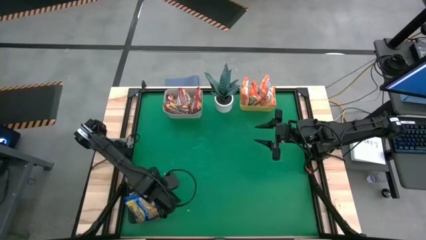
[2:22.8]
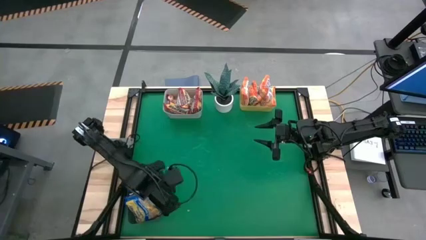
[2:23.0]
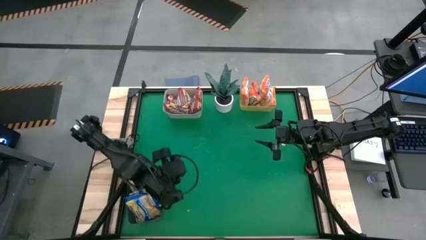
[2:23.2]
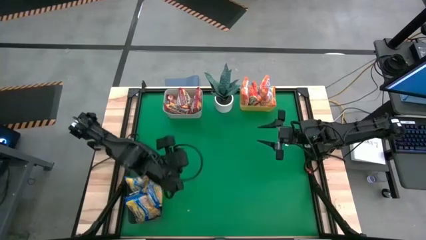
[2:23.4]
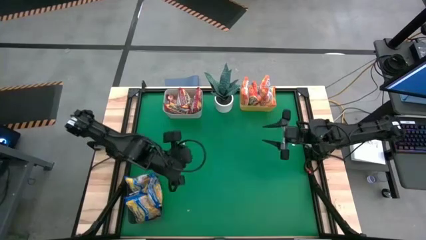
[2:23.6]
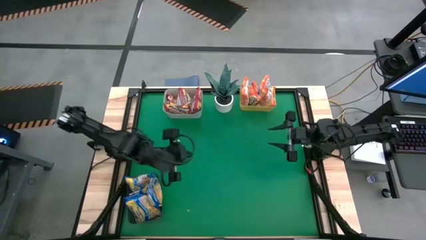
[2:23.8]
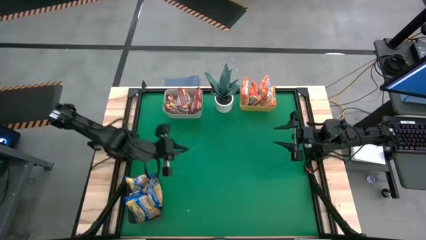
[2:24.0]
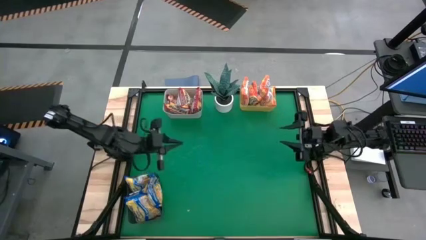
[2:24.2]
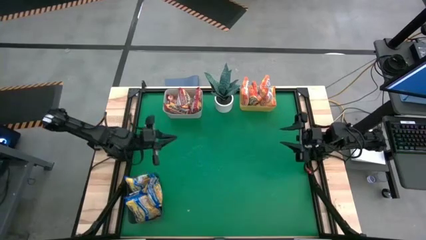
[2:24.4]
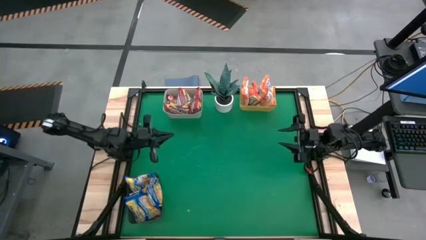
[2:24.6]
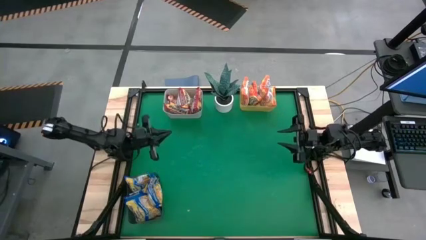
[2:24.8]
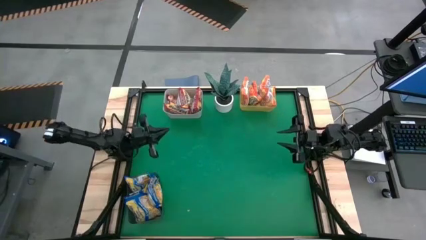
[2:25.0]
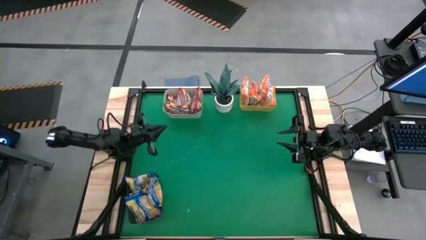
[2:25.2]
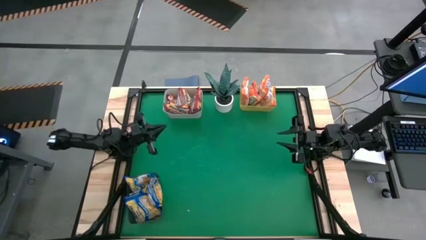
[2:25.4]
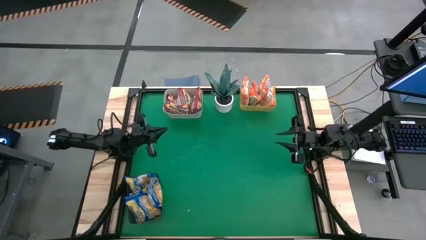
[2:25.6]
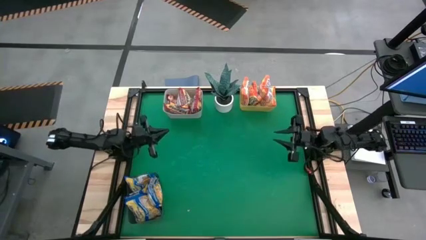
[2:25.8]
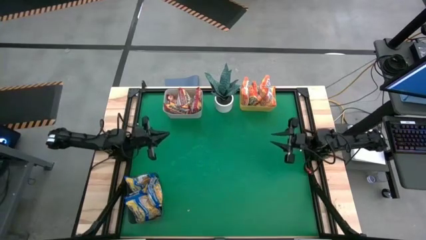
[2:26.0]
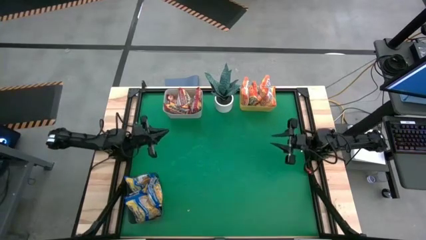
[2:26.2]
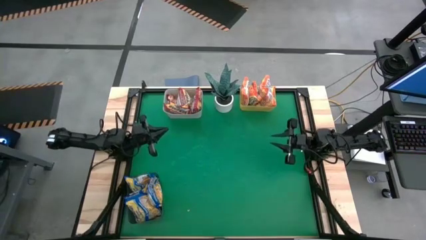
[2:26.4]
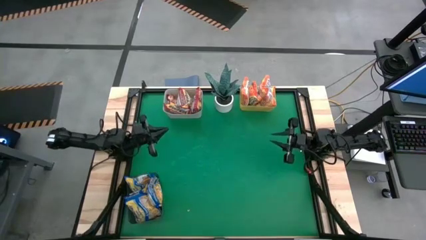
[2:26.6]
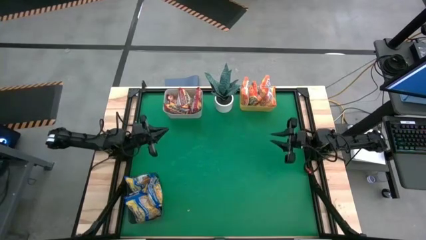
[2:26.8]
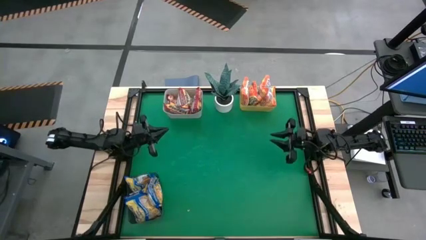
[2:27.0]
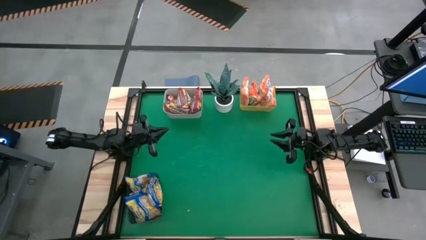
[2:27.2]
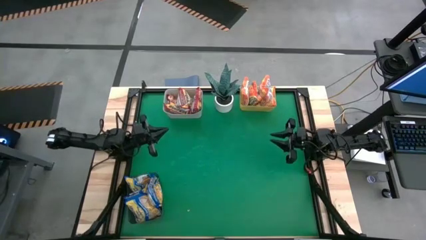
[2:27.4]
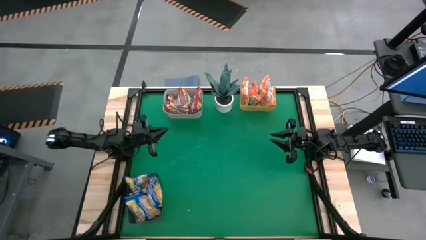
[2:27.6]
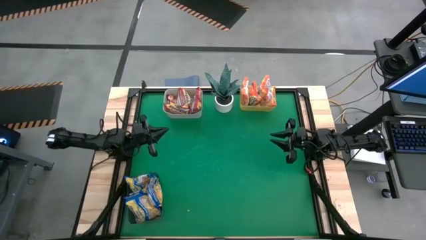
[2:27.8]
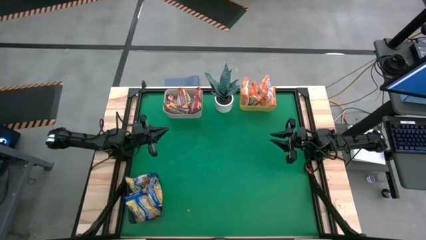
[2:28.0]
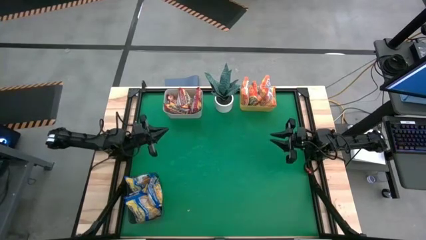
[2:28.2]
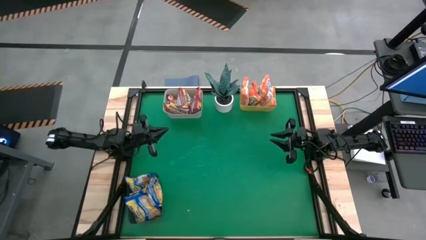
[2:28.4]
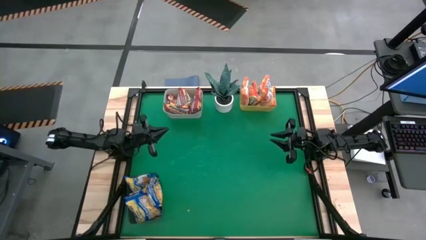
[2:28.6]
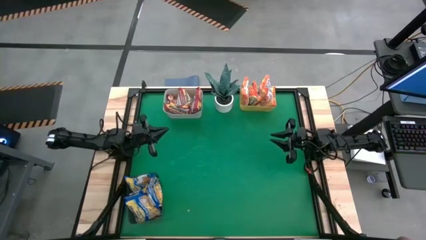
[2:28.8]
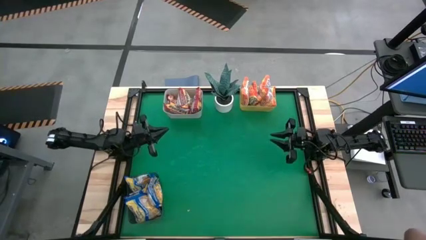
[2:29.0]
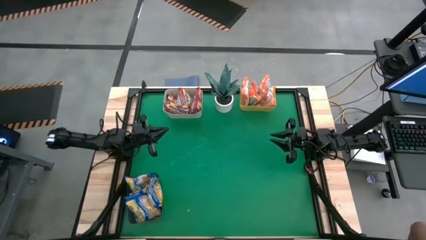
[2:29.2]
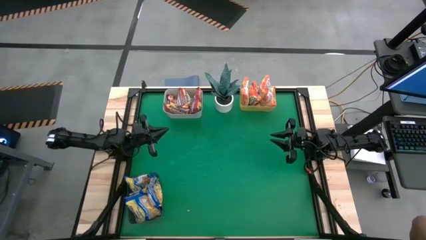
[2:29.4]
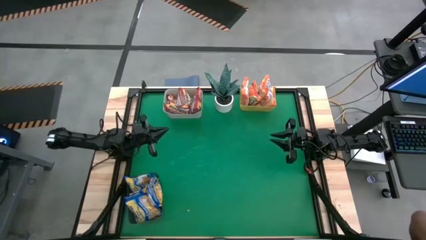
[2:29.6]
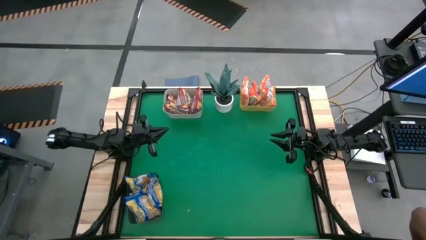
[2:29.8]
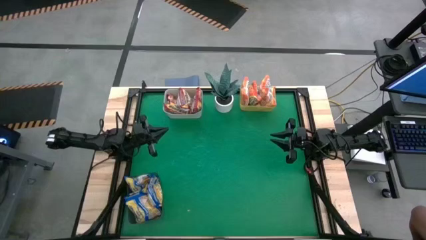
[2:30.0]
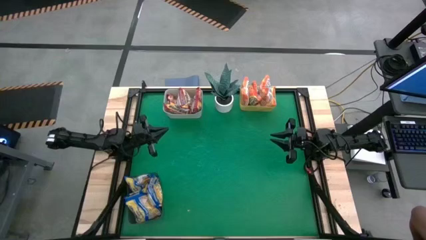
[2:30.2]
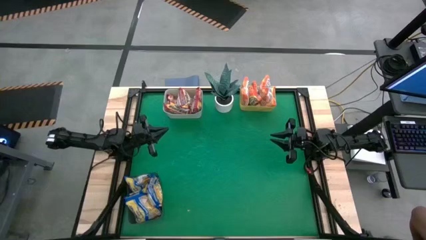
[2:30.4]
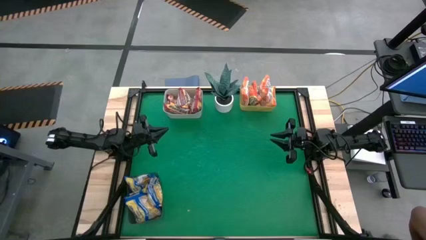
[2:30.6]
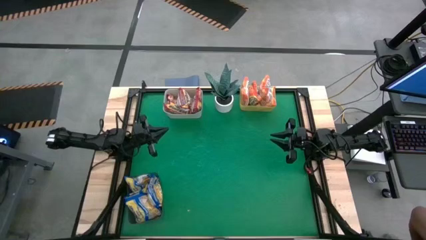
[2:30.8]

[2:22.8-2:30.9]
Task: Sort Maruchan noodles
Return to Home Position

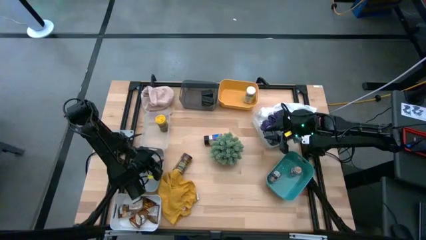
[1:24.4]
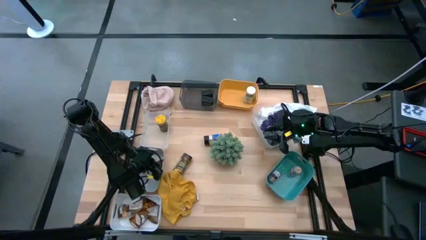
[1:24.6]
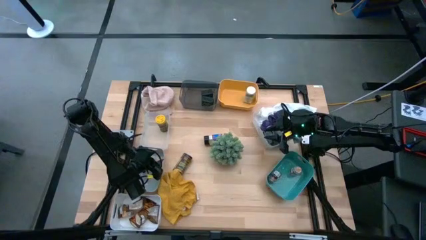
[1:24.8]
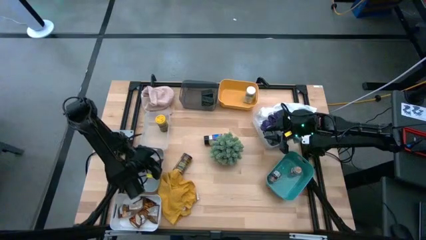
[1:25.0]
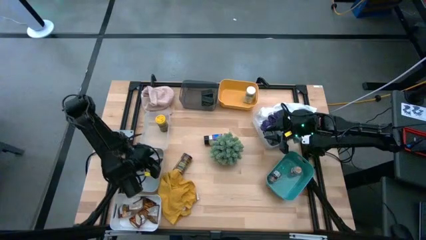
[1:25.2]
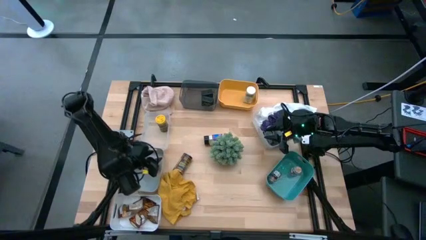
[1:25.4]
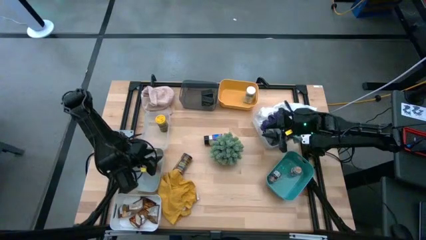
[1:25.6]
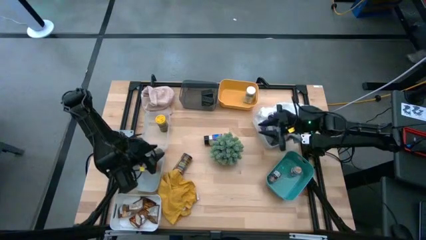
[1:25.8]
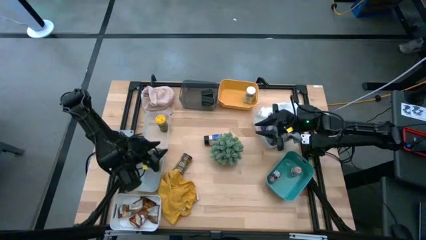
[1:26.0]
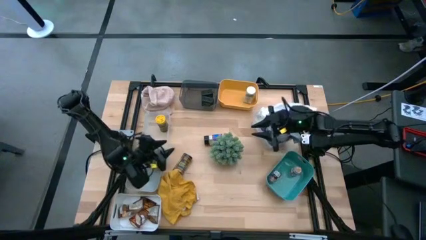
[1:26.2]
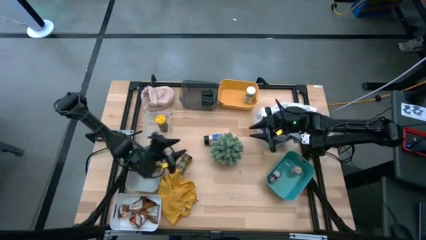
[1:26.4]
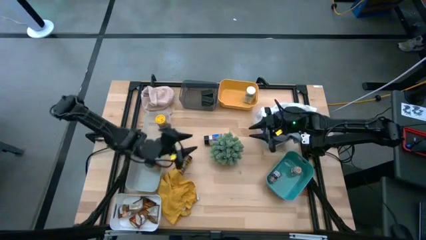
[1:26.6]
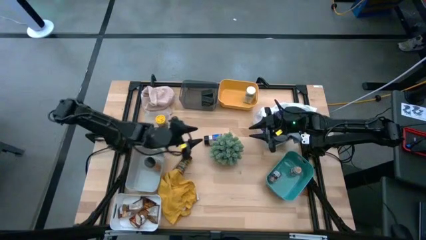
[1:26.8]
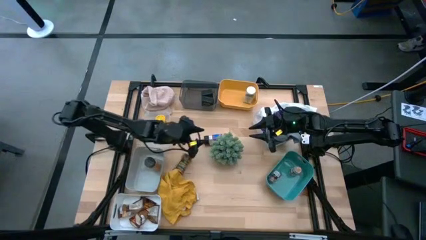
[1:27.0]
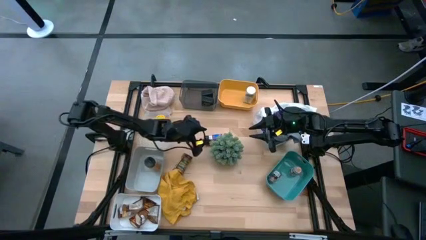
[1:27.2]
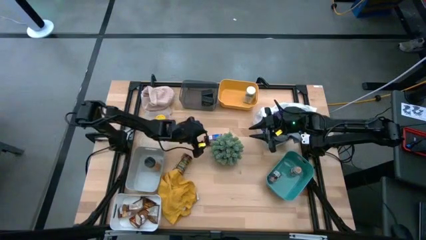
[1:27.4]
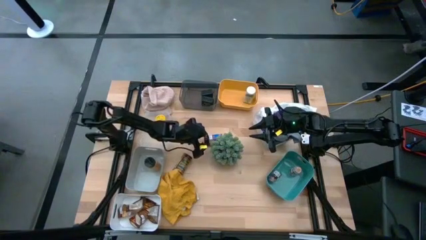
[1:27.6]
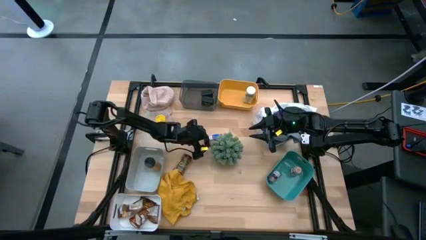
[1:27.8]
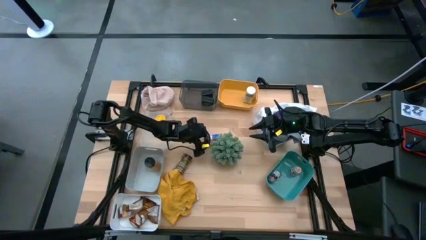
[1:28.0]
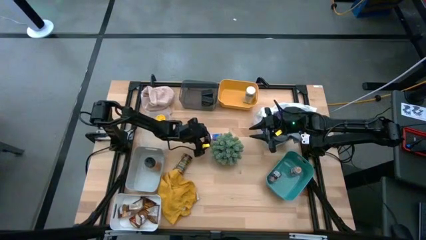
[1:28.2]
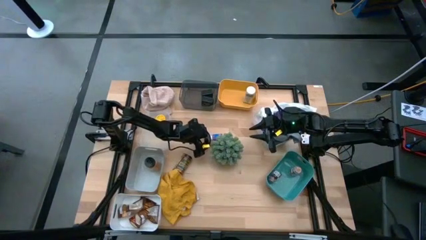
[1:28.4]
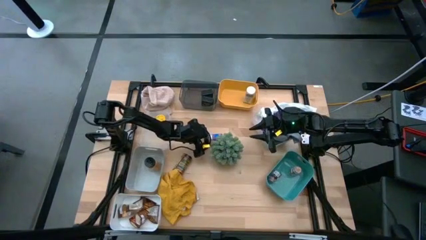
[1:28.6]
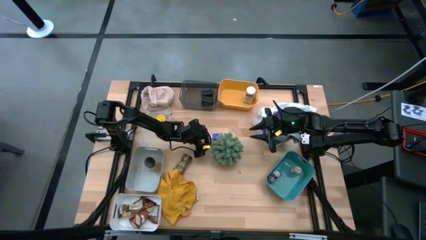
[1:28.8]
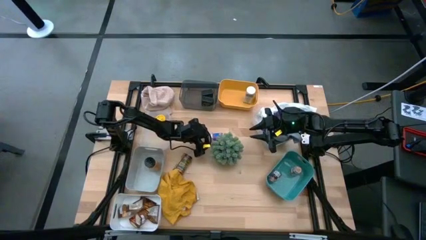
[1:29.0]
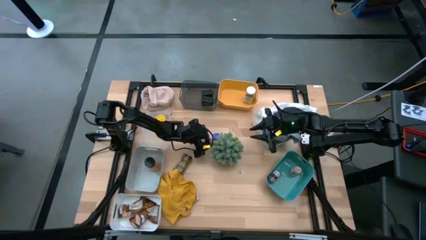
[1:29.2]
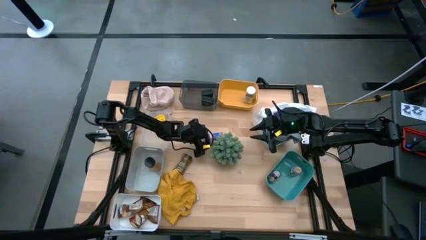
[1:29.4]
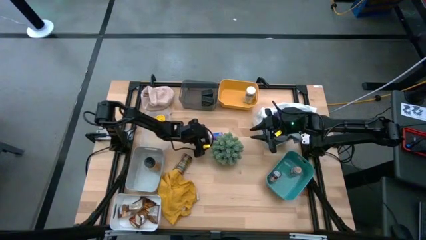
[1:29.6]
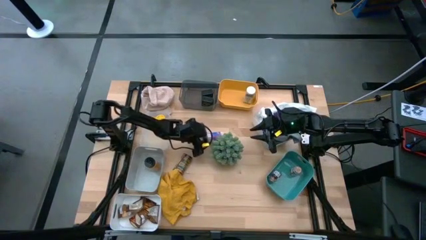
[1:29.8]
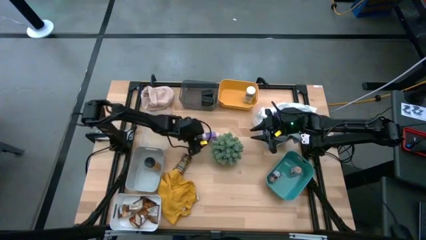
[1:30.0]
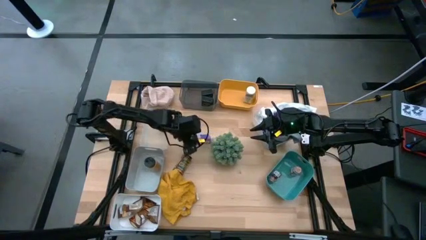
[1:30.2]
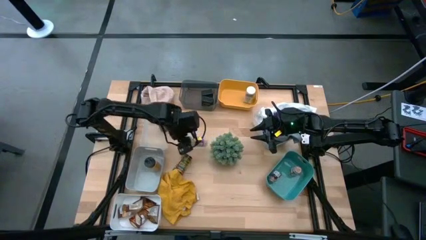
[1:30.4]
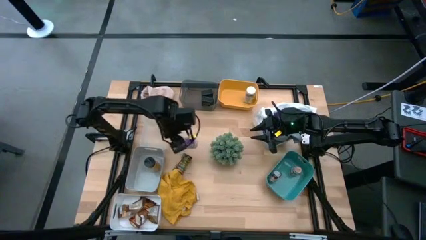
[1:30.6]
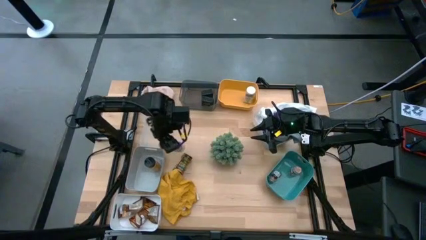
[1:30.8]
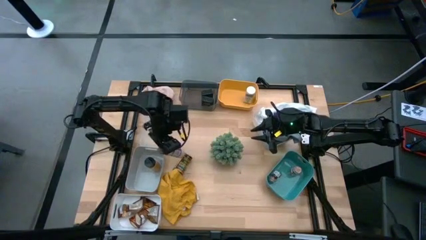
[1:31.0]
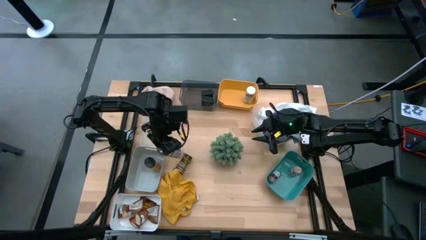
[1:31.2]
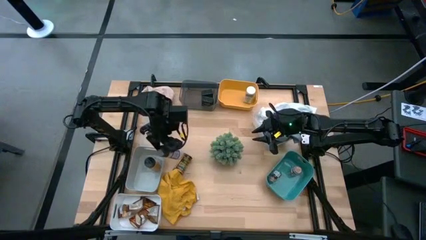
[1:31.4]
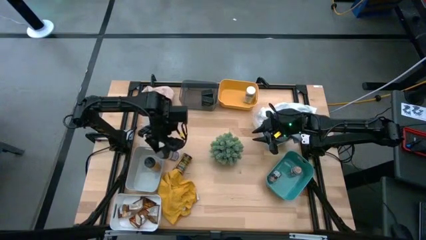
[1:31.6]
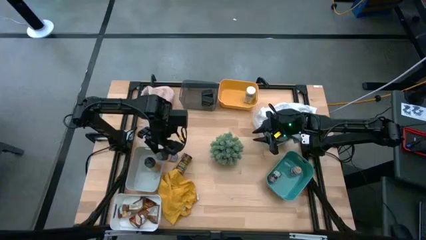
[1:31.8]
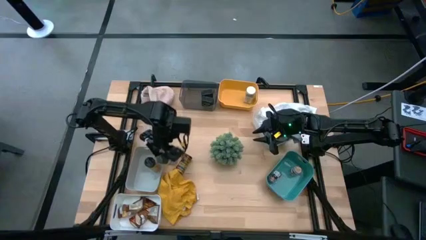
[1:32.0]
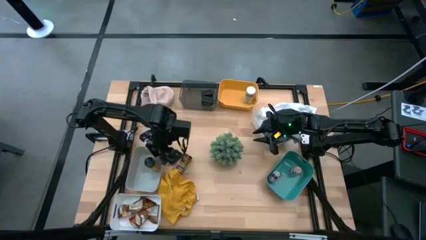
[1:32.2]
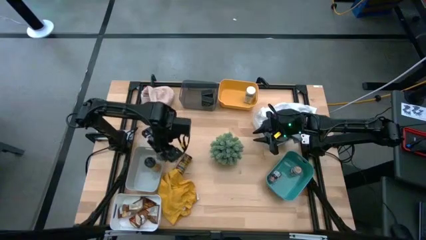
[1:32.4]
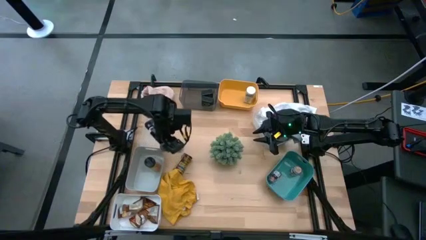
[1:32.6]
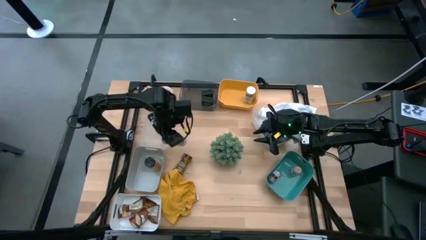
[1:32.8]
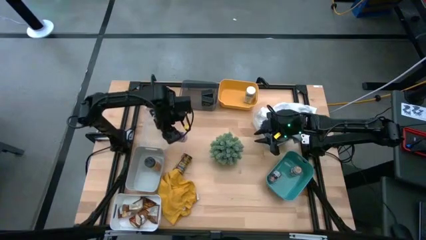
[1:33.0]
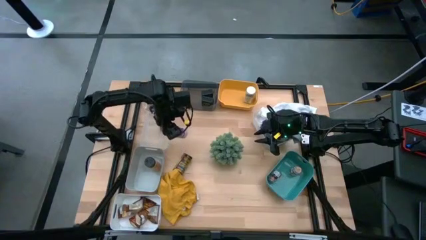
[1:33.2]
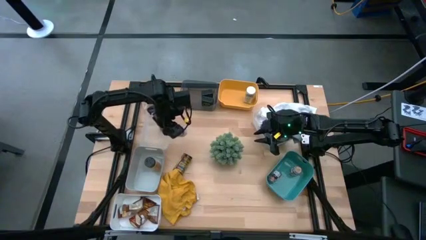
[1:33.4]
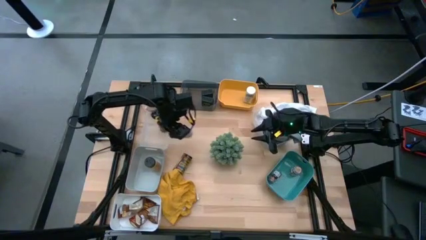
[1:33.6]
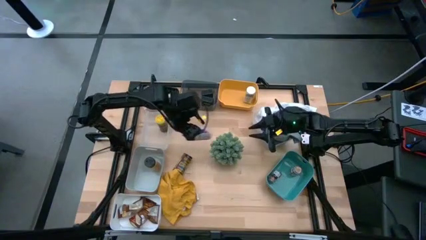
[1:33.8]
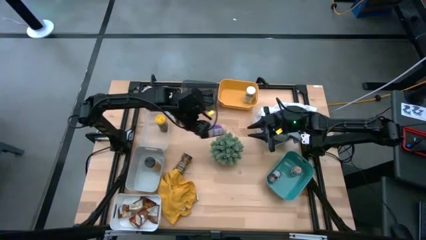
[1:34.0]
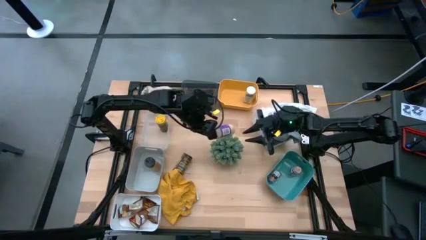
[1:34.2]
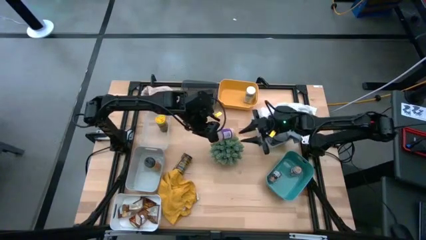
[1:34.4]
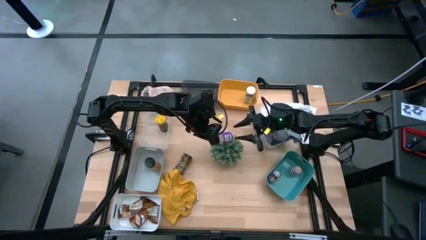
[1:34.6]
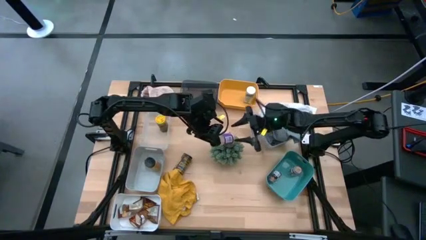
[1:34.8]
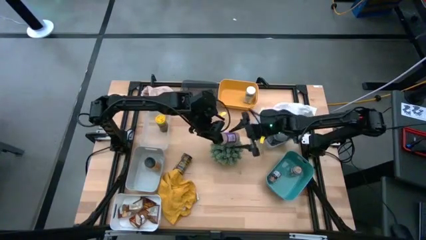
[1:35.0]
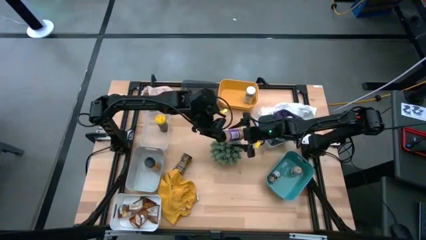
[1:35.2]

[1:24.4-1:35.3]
Task: Sort spices by type
Put the black spice bottle into the top white bin
